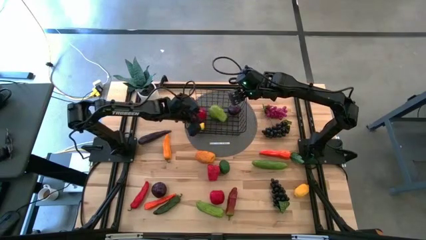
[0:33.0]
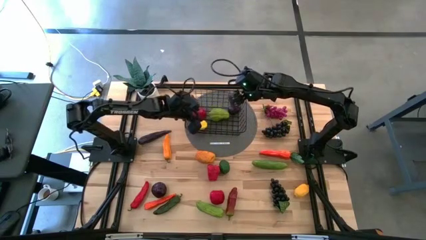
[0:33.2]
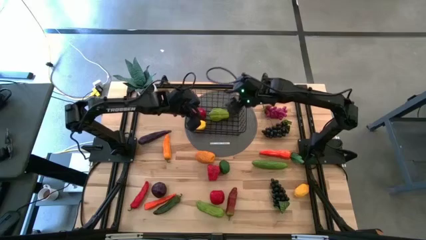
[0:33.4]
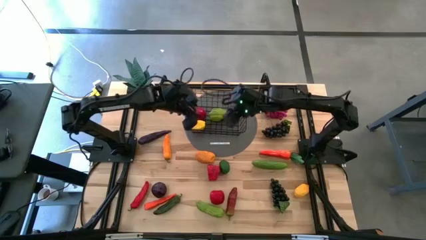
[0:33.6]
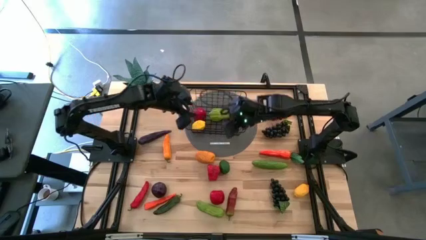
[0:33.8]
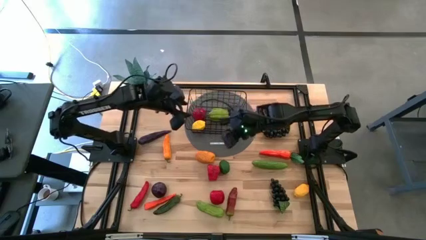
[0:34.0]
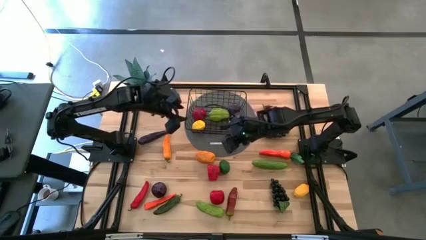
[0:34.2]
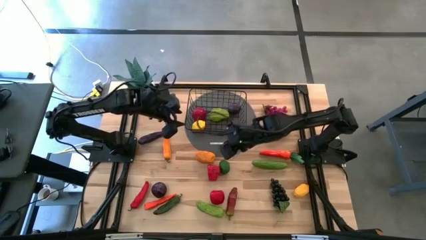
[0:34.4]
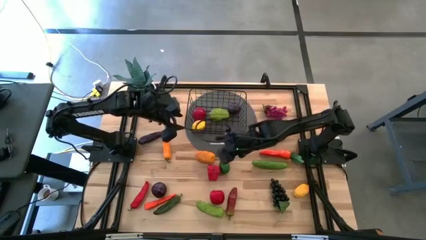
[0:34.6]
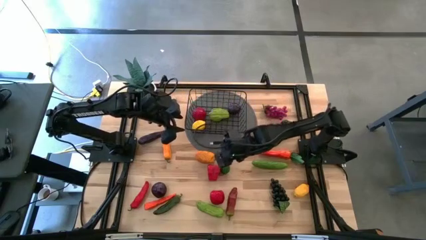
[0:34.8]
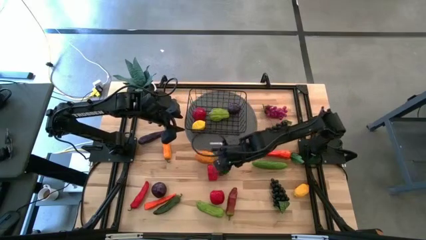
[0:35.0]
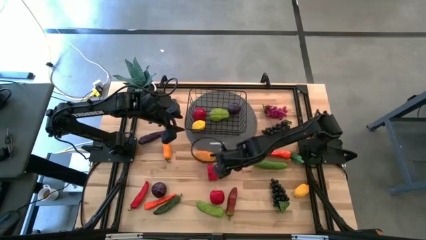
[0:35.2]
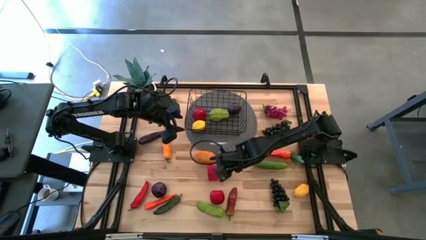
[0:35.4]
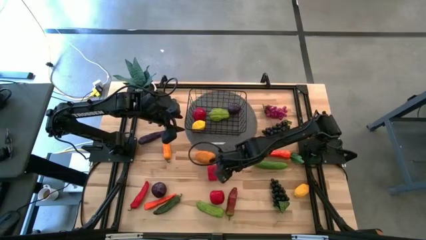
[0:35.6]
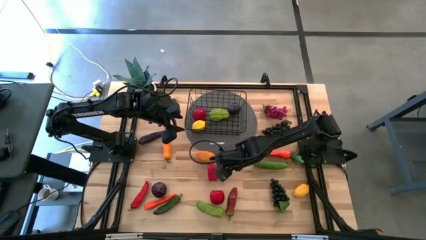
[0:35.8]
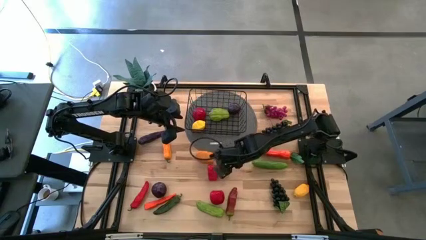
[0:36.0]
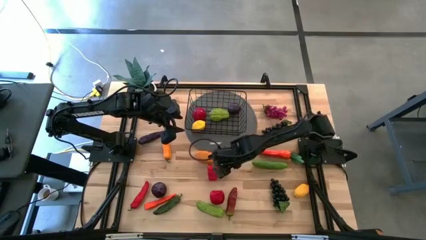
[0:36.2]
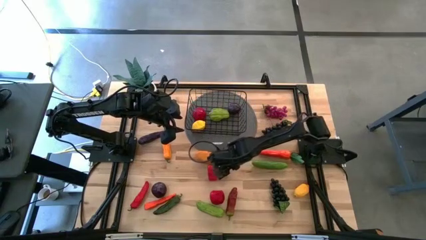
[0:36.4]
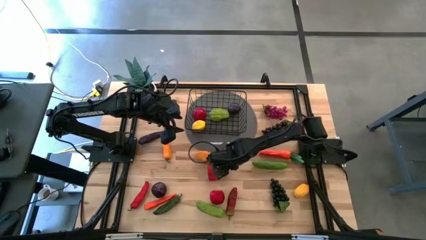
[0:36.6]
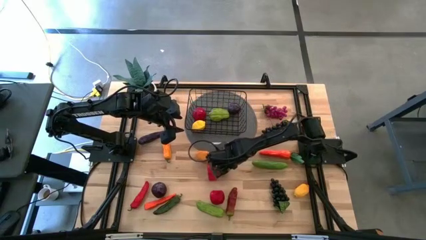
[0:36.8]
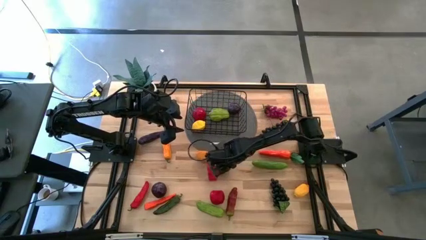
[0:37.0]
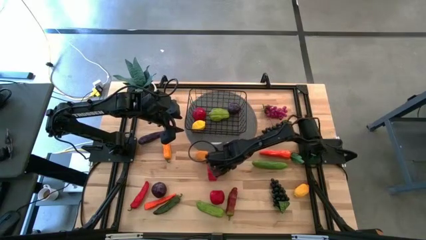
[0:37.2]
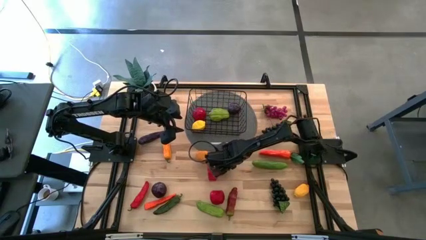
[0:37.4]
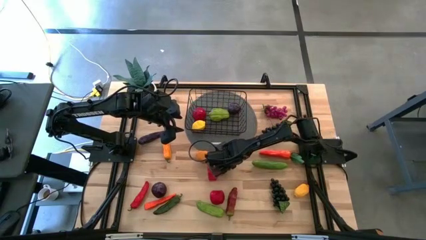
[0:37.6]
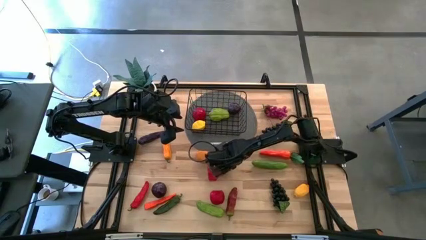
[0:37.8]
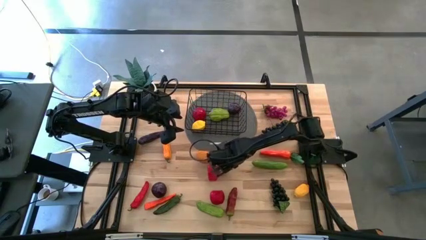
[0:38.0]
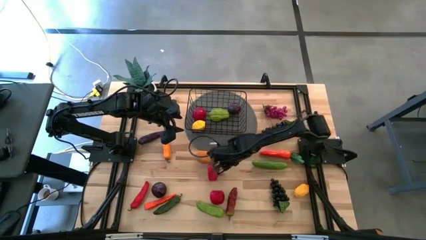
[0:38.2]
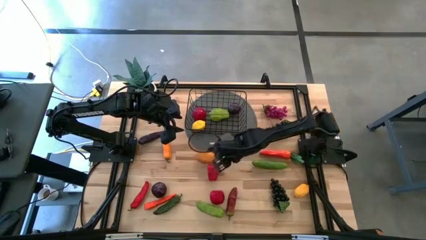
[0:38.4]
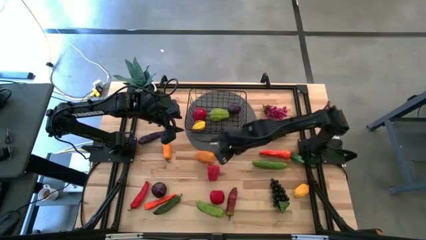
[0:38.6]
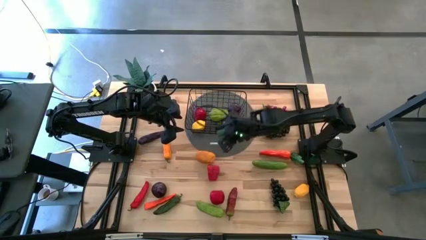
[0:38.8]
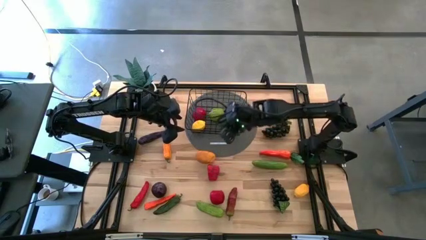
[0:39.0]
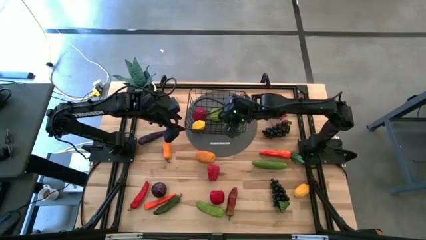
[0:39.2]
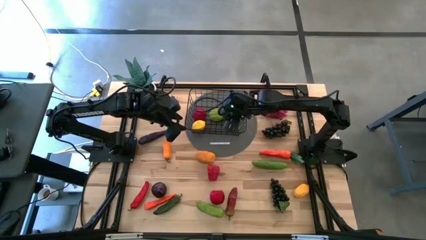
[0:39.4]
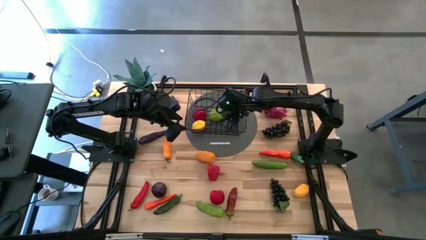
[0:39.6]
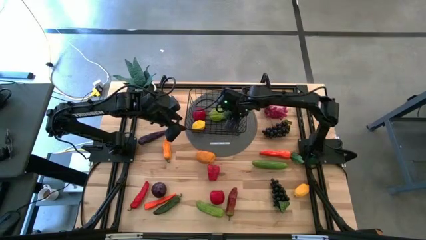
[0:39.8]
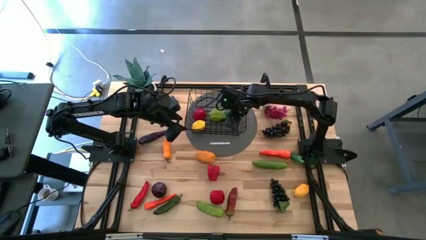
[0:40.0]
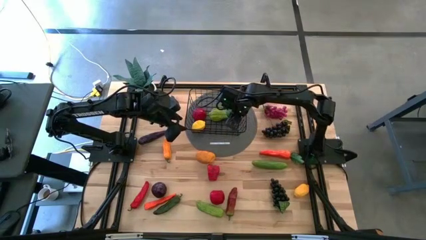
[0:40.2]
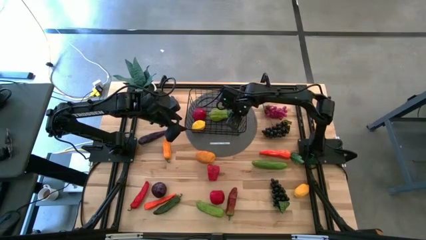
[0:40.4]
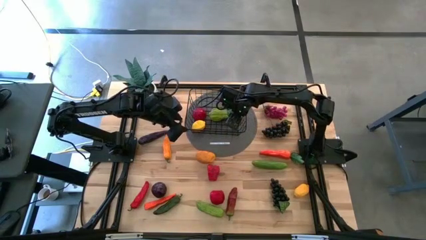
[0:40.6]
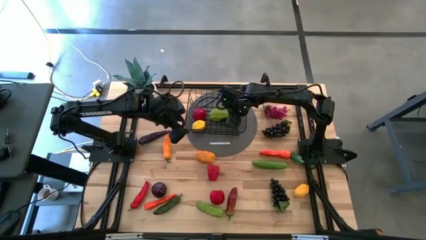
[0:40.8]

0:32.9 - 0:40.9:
Task: Build produce basket
Put the lime into the wire basket

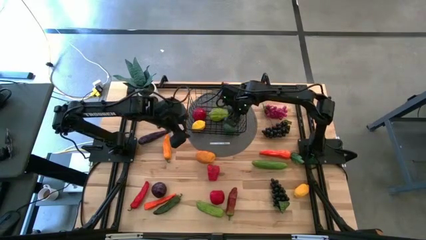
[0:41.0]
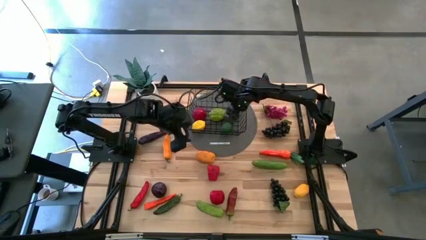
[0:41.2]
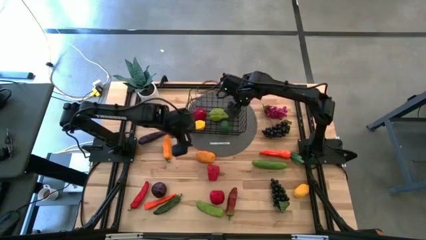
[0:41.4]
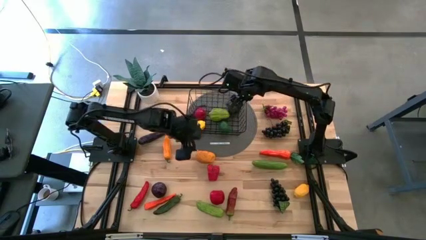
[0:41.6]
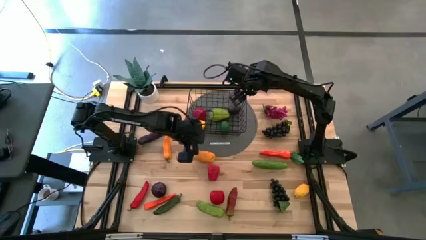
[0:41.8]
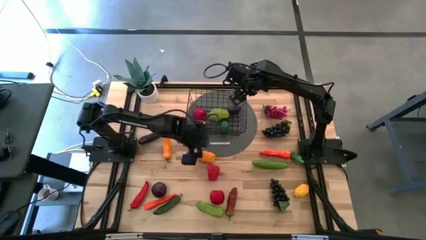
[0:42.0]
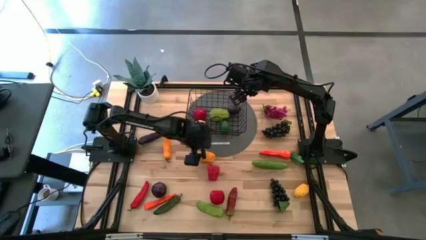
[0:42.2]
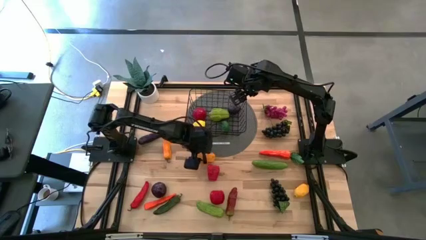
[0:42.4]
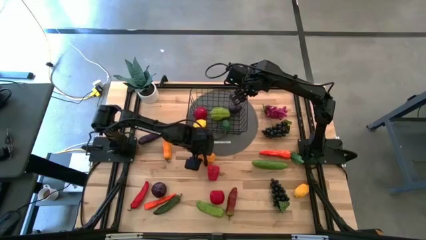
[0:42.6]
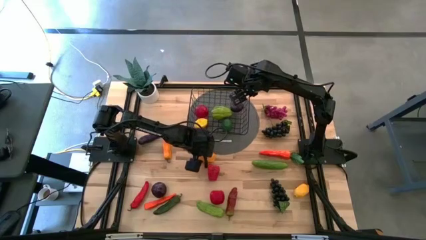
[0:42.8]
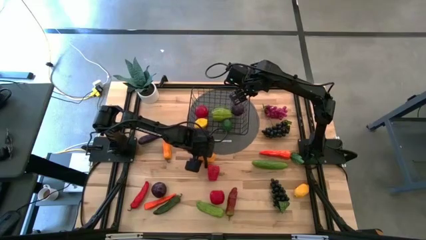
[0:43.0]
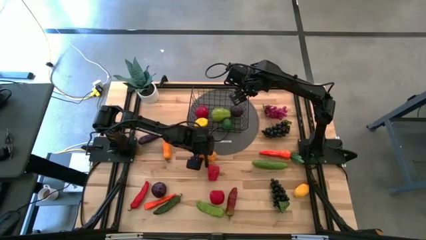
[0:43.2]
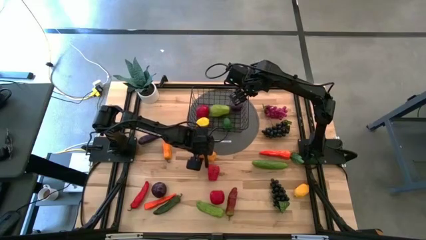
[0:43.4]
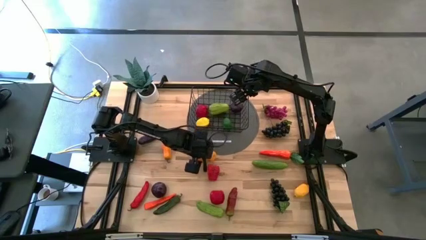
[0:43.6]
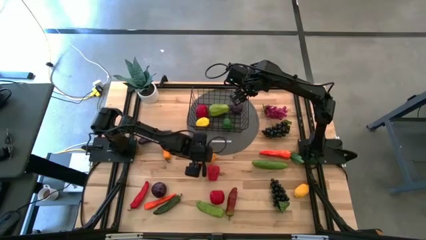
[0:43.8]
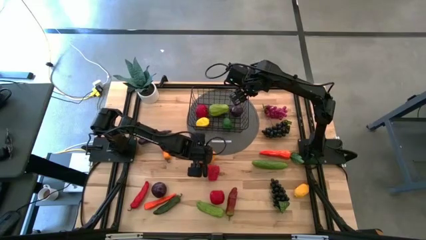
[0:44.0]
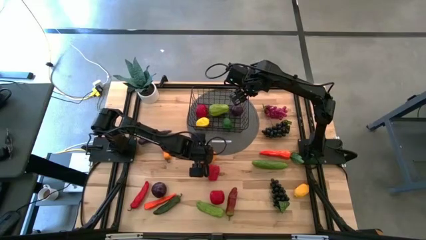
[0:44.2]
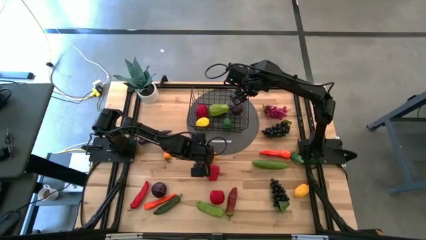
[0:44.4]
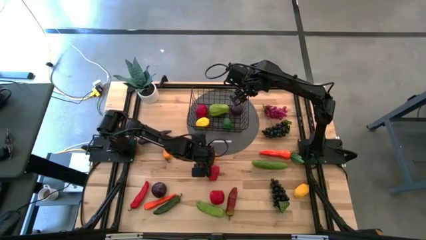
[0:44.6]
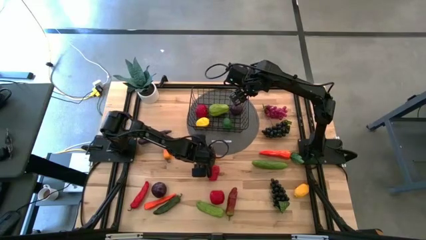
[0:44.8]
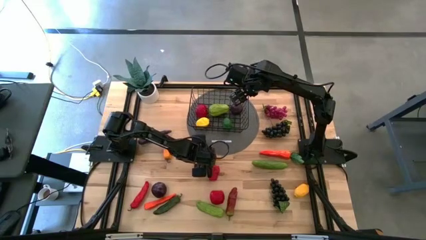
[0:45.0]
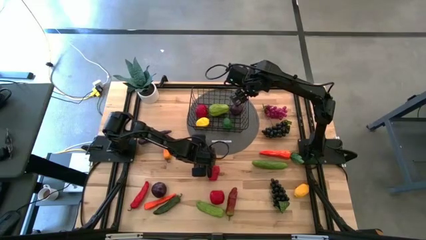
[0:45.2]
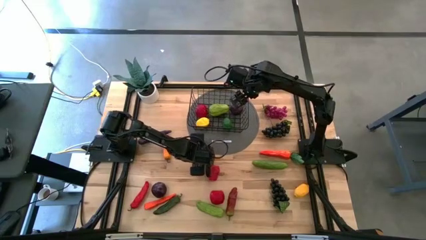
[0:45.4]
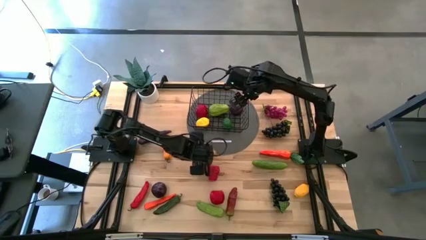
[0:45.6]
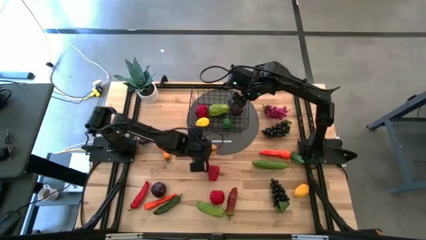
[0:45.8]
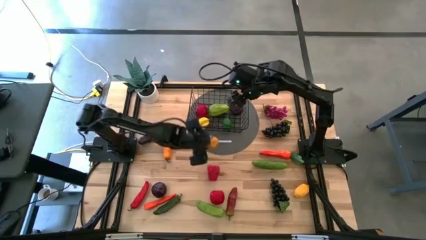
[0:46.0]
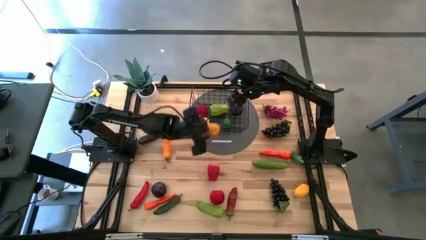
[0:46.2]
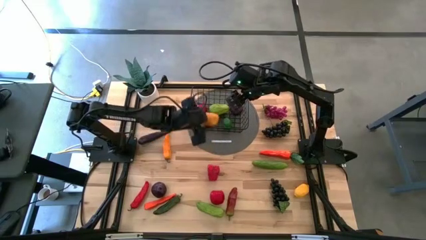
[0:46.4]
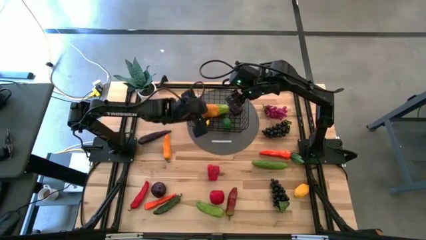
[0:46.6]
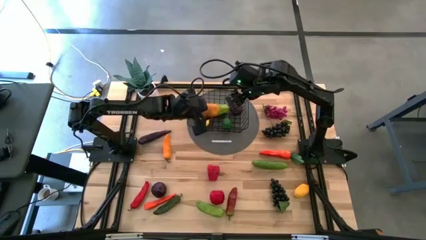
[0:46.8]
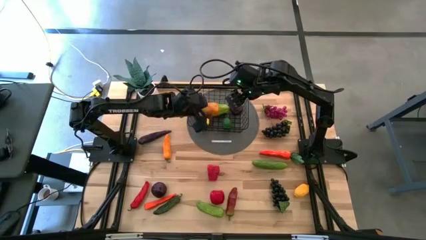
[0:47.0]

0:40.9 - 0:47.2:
Put the potato into the wire basket

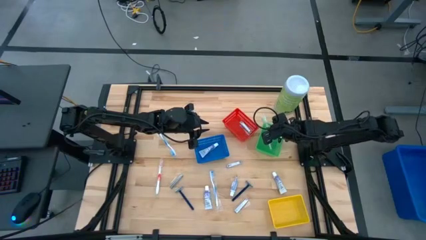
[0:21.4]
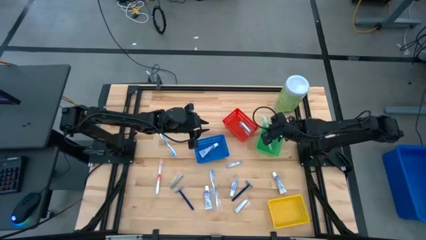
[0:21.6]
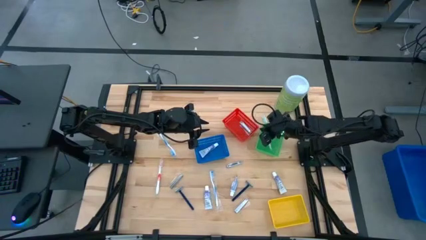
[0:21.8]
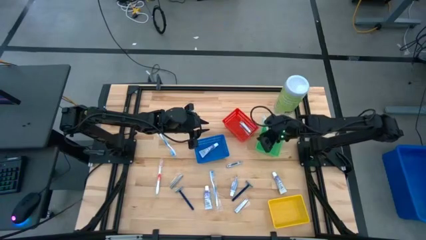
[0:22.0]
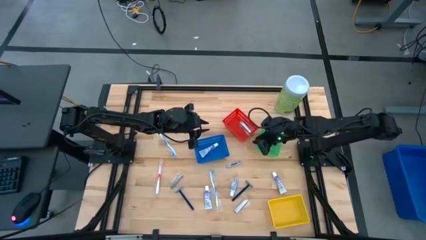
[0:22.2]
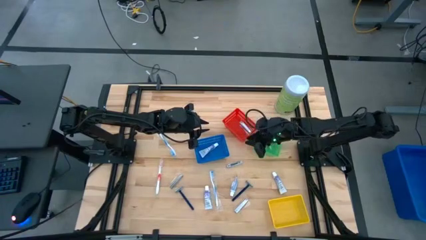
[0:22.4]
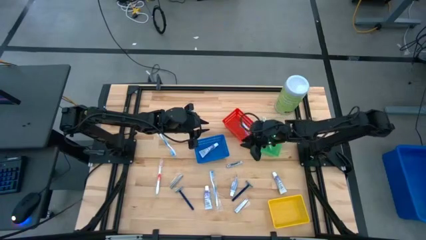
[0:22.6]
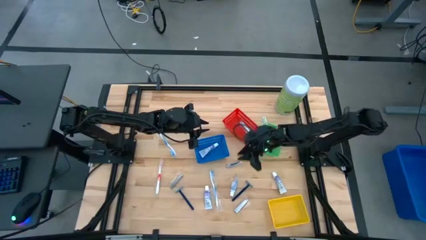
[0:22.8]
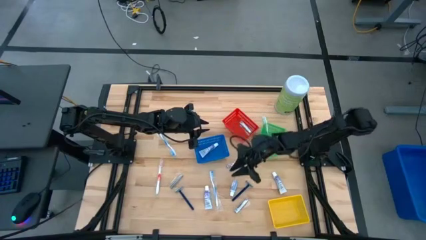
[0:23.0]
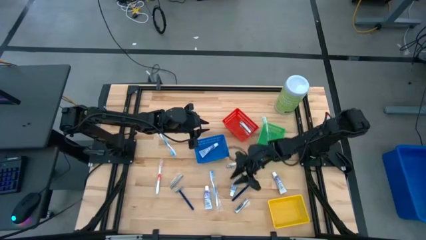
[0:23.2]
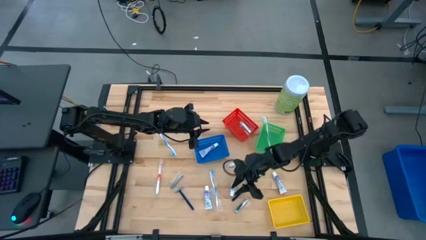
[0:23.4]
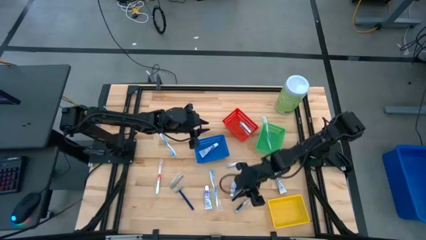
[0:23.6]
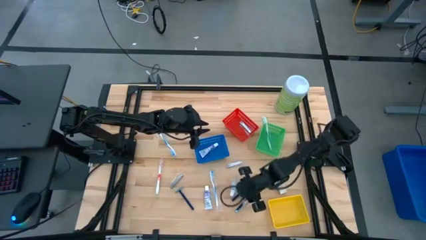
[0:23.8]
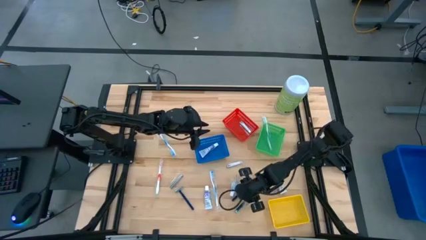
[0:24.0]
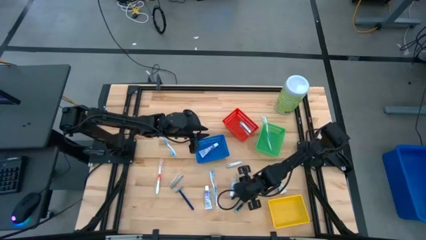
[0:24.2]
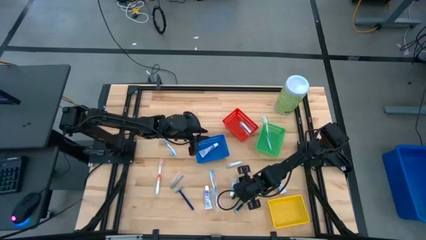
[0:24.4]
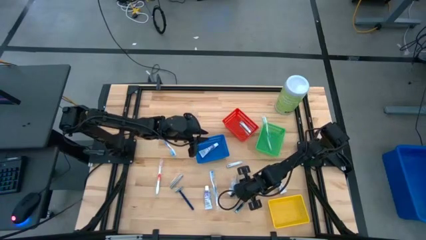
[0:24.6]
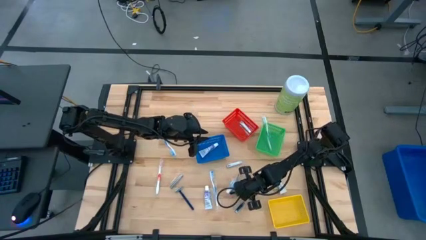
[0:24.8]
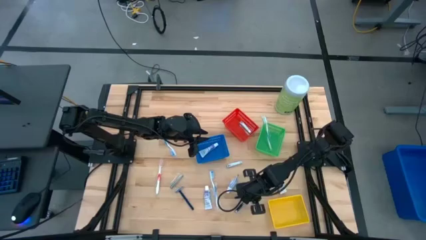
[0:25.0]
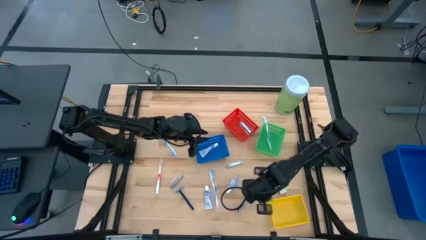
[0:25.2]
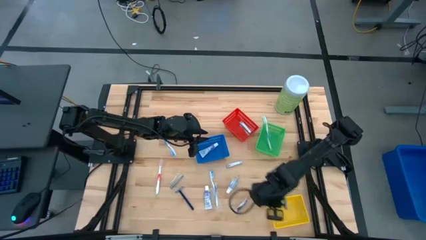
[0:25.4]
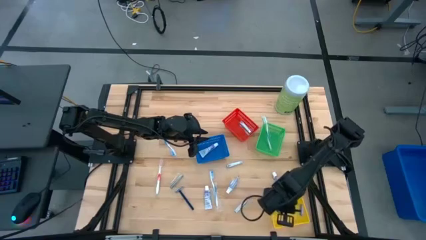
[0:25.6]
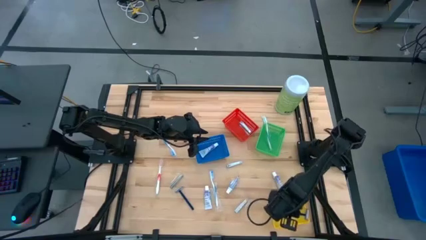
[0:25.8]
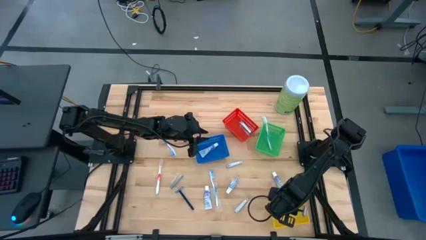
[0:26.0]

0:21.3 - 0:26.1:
Task: Pick & Place Travel size toiletries
Put the blue razor into the yellow bin
